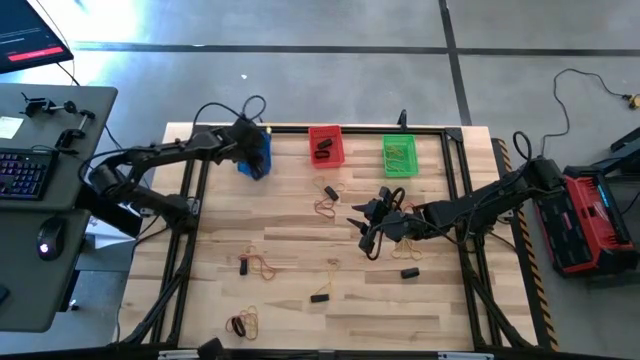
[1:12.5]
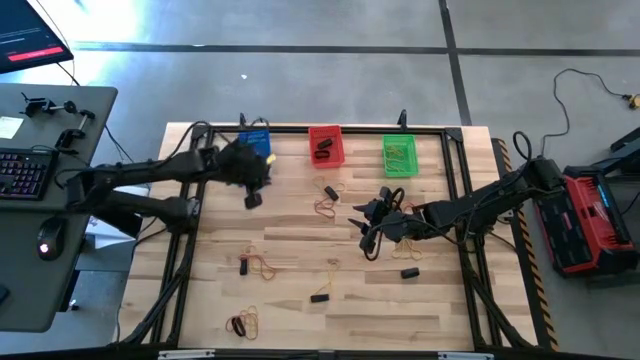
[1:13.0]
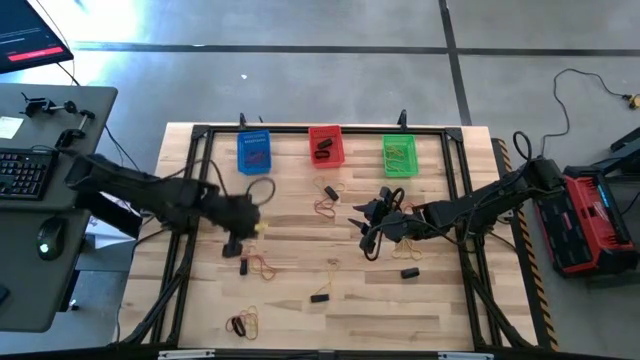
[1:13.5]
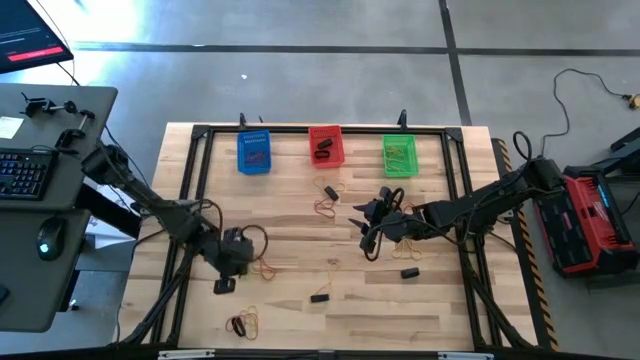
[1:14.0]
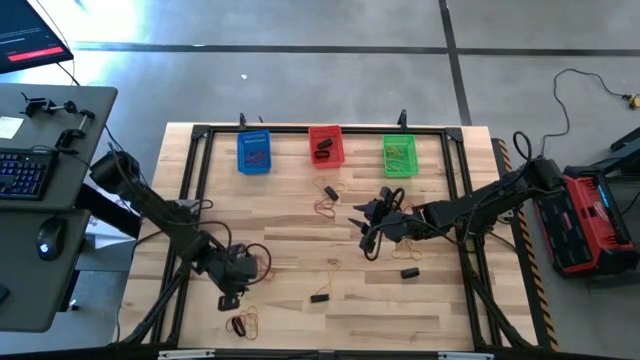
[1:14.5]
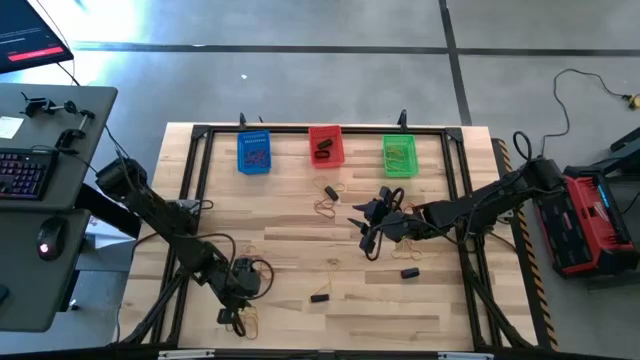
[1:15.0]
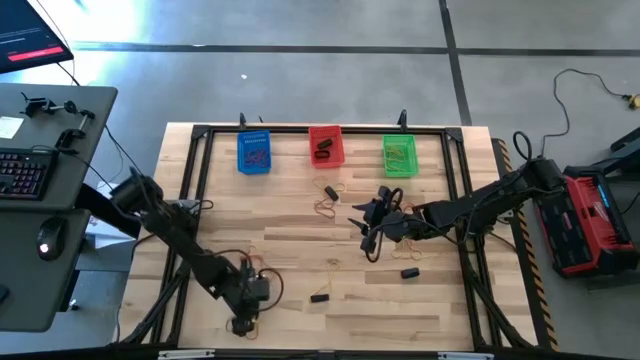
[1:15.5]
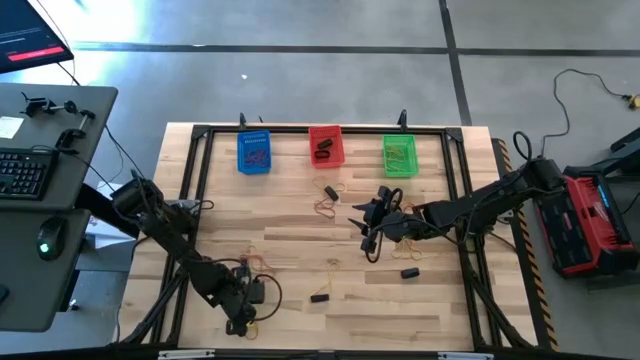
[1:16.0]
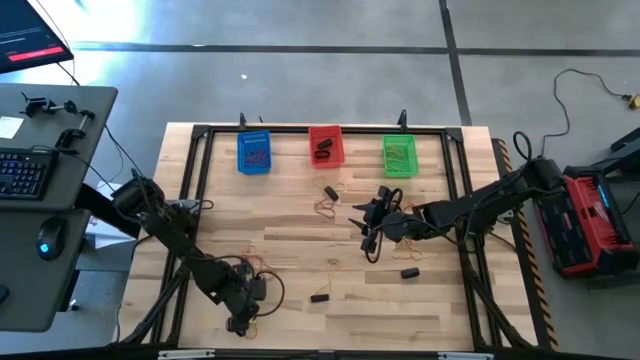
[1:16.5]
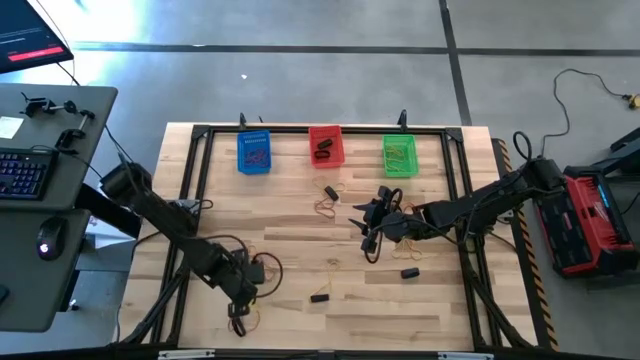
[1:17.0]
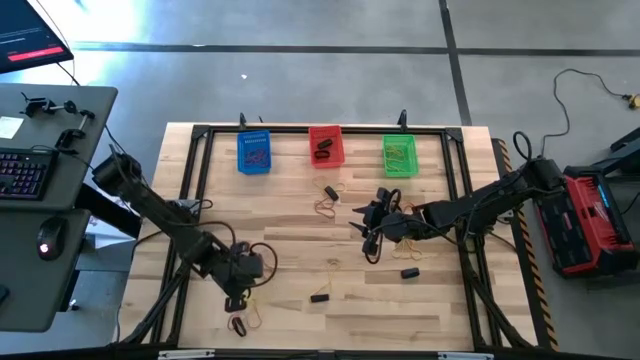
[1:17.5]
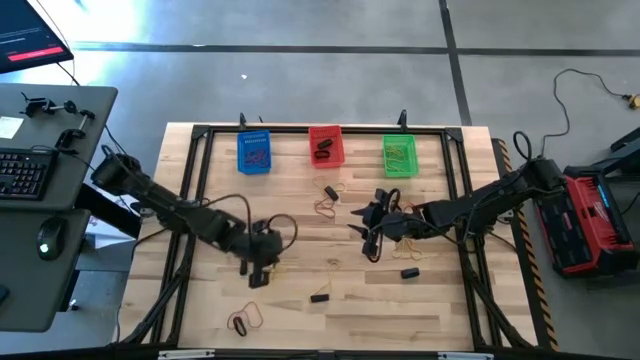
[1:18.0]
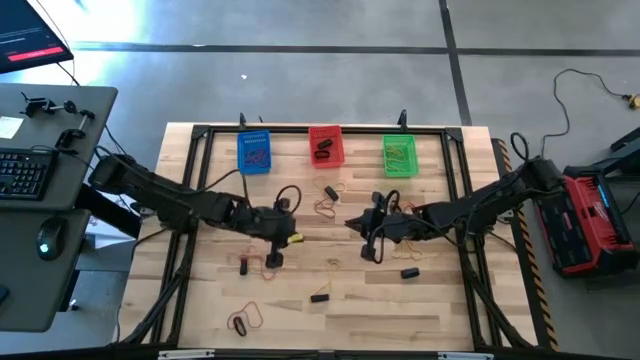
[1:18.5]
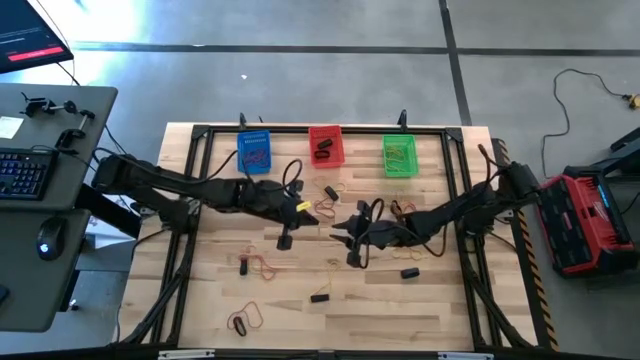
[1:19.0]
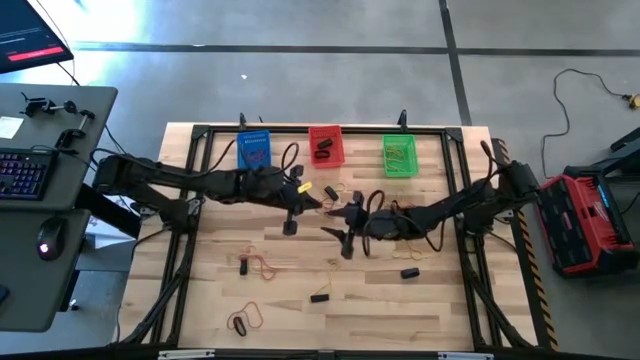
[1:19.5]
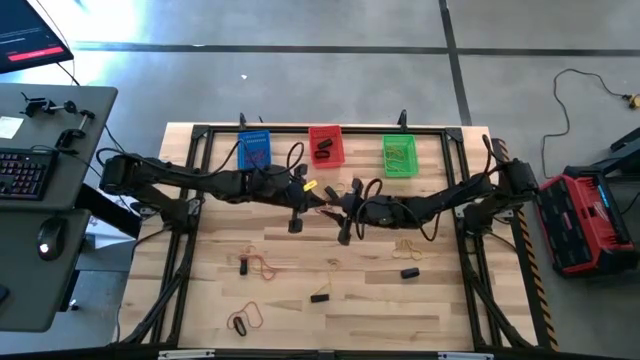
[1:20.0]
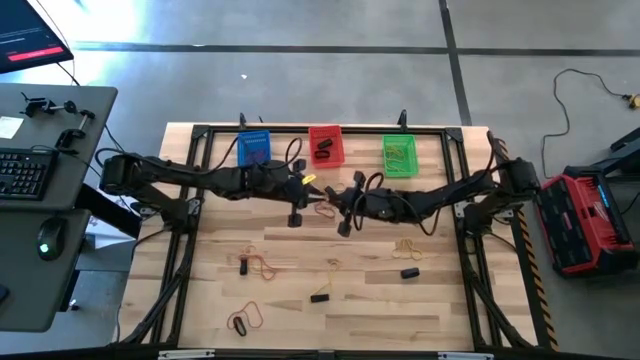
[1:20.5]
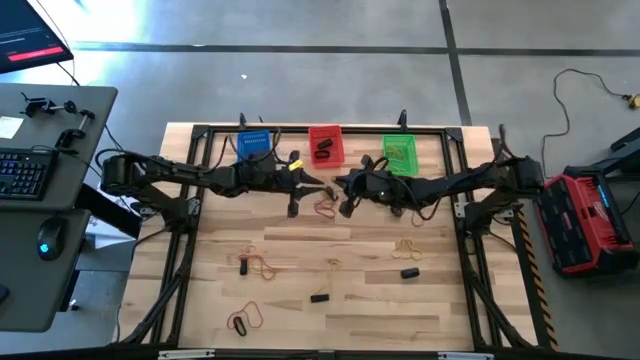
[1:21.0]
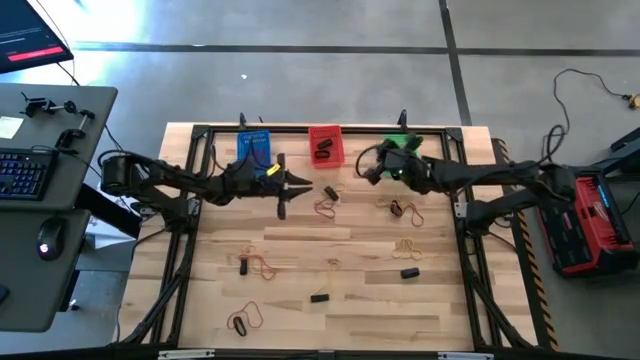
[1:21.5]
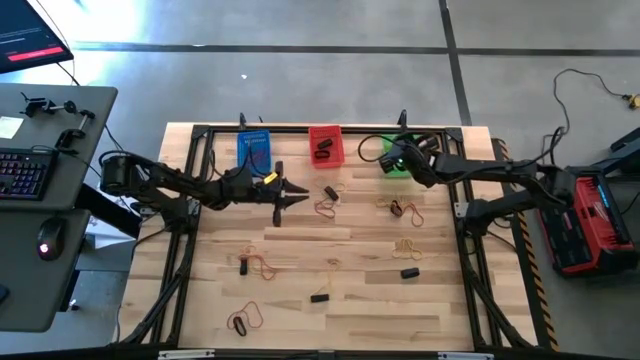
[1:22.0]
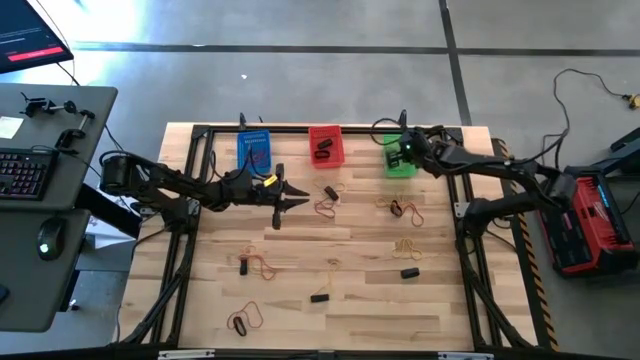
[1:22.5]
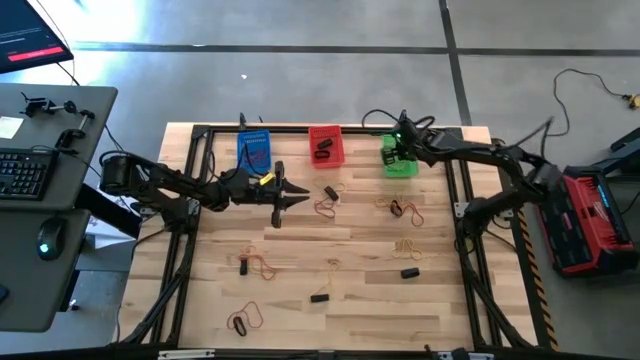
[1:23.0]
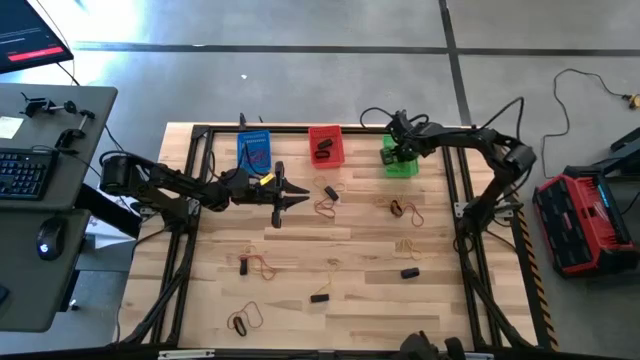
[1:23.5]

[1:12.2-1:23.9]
Task: Sort rubber bands into baskets
Put the yellow rubber band into the green bin

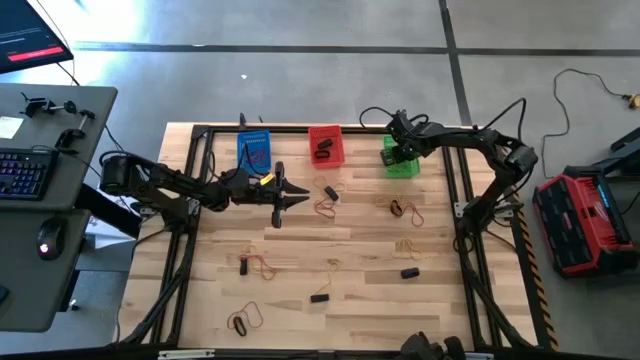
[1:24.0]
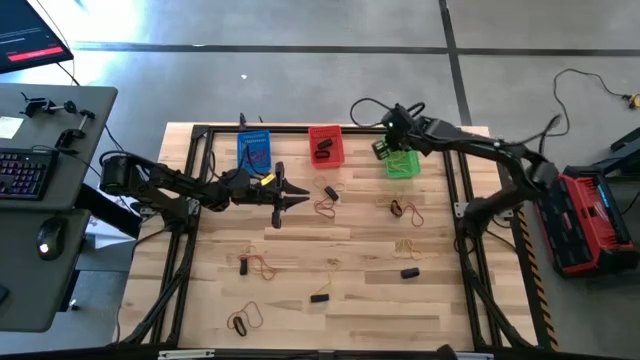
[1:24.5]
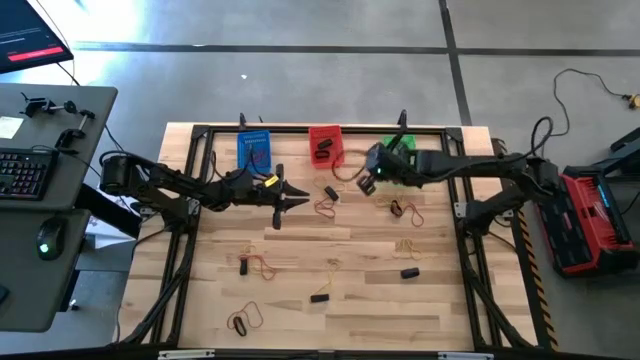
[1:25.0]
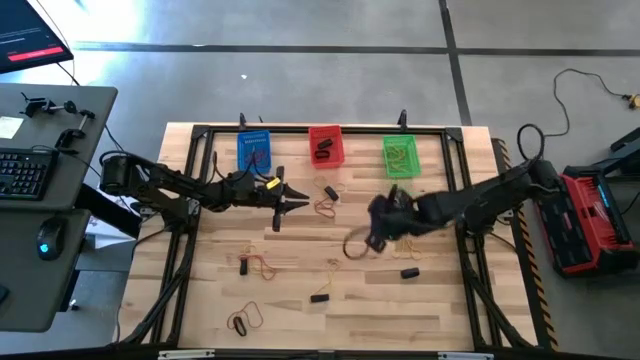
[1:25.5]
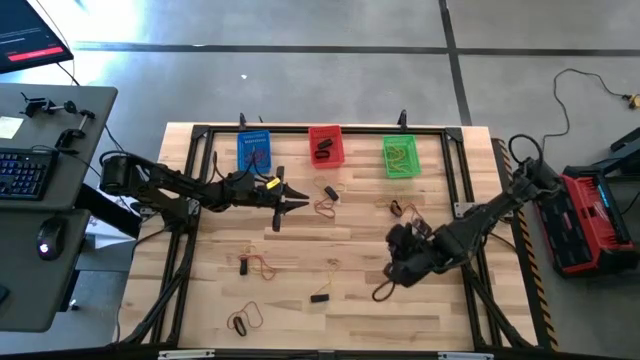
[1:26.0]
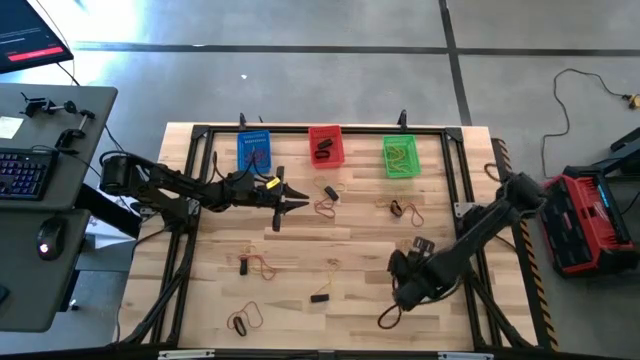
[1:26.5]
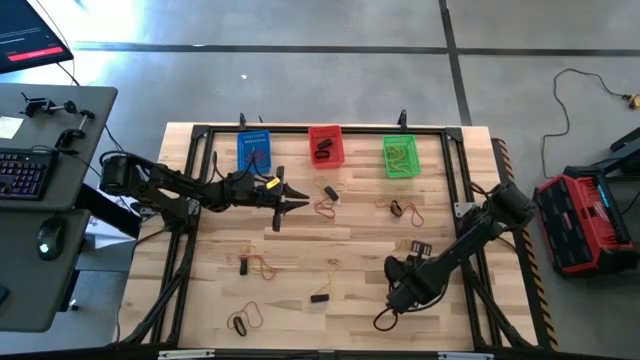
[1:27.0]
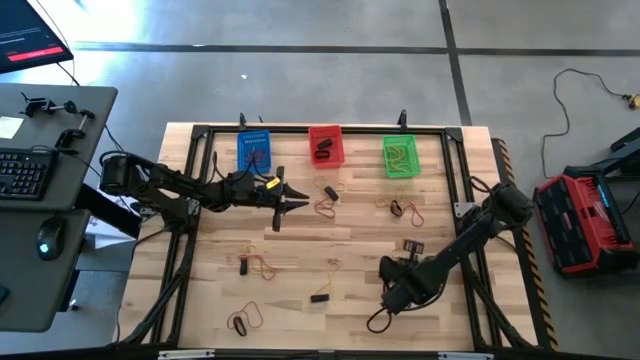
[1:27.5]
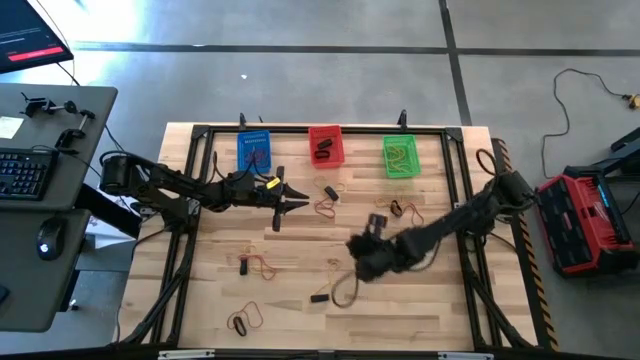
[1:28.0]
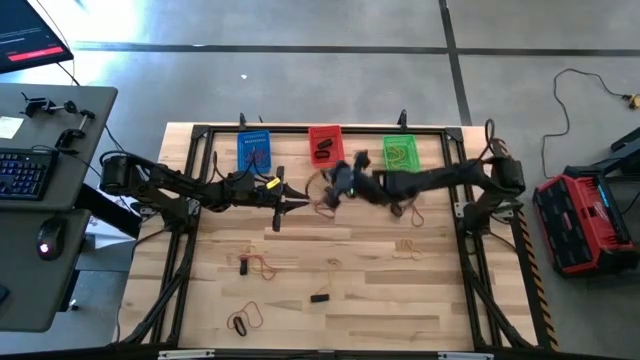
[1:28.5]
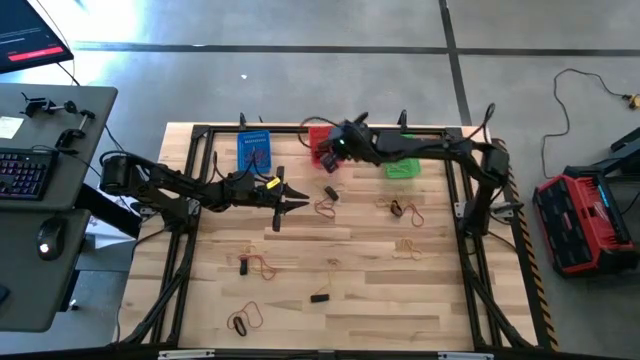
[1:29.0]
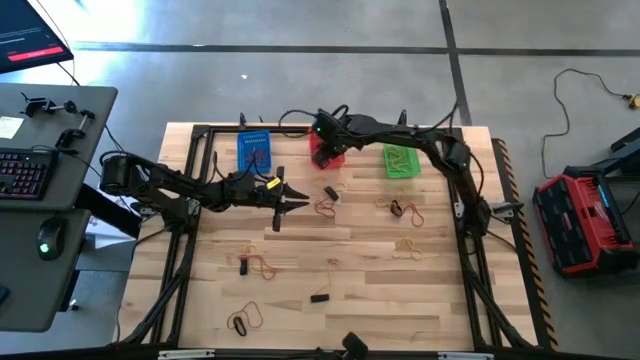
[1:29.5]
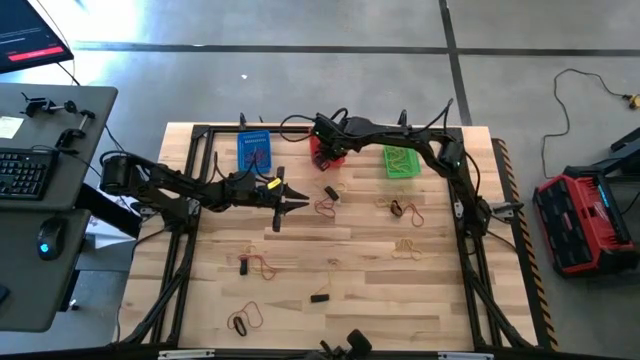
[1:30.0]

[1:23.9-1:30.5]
Put the black rubber band into the red bin

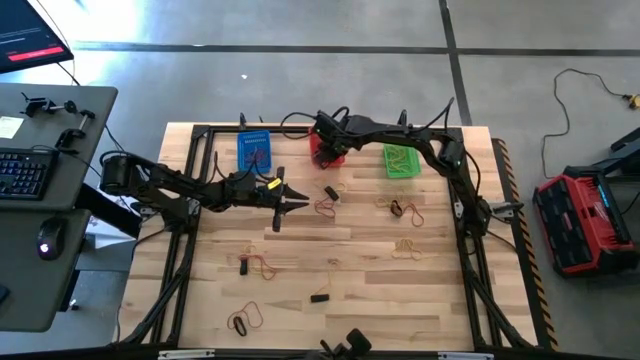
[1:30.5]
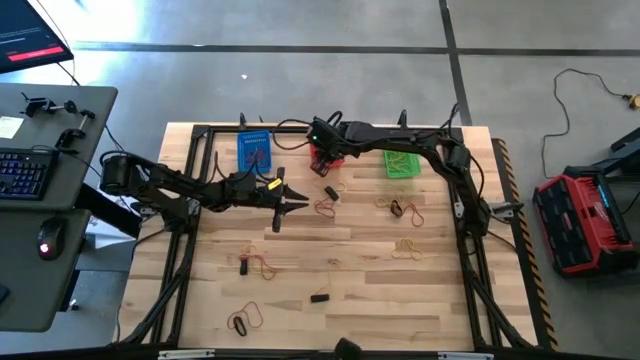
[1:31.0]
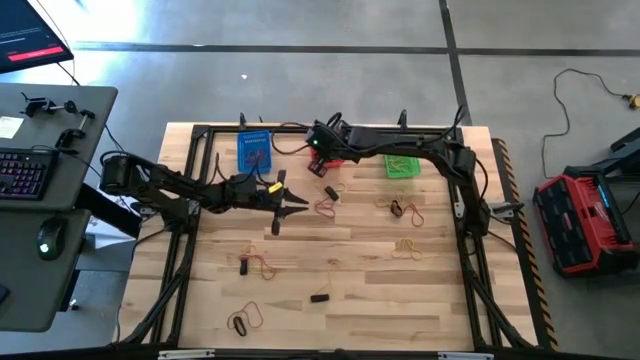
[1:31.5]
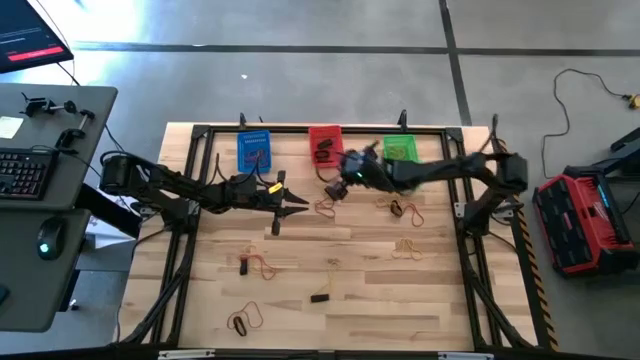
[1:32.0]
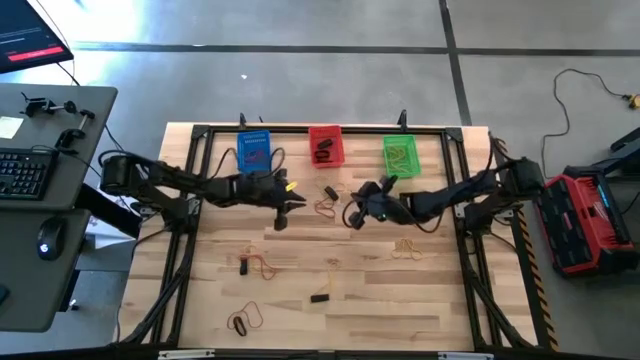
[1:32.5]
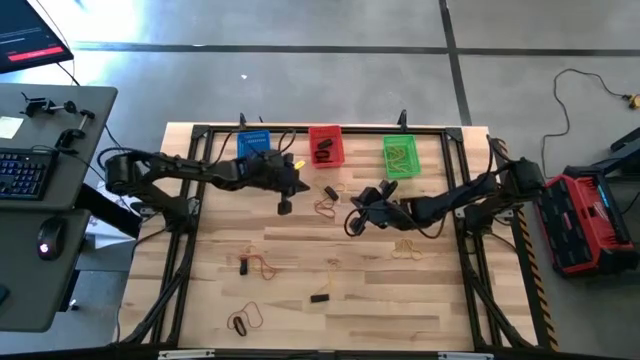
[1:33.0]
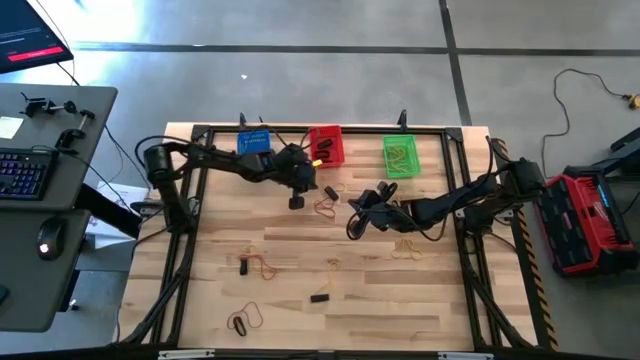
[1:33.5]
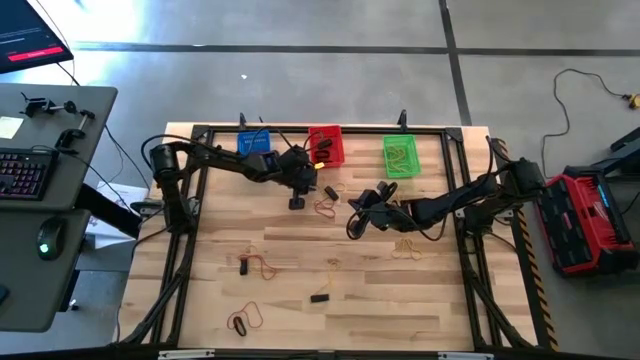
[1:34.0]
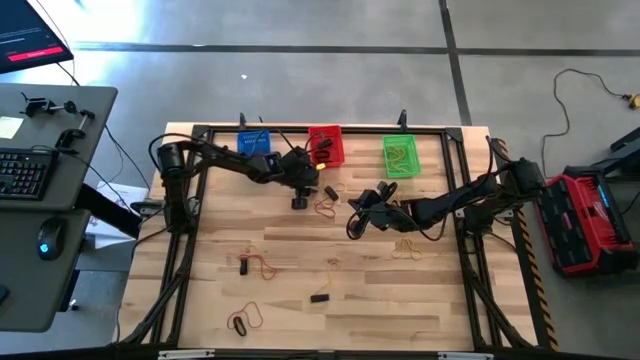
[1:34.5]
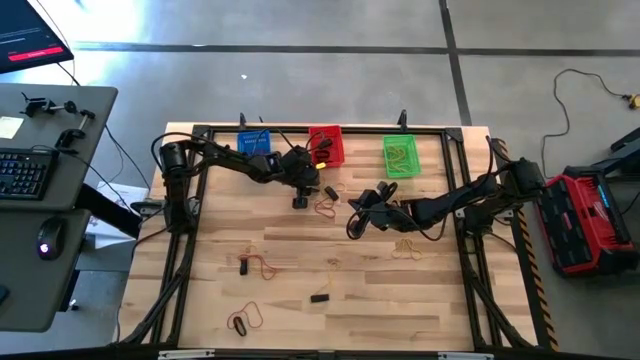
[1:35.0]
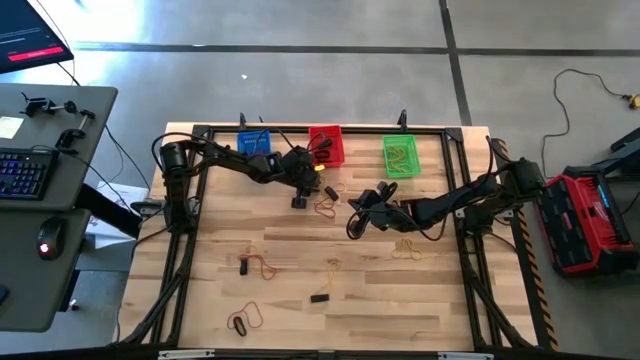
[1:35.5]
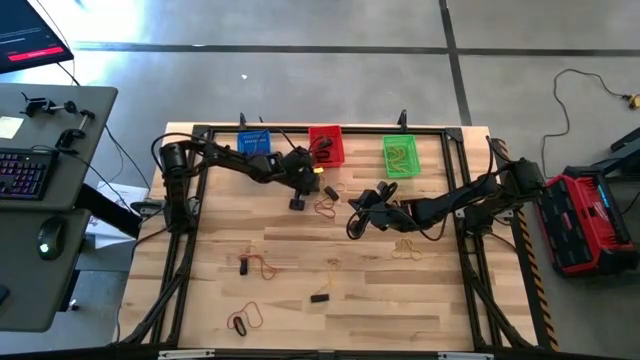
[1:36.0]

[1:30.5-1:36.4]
Put the yellow rubber band into the green bin
